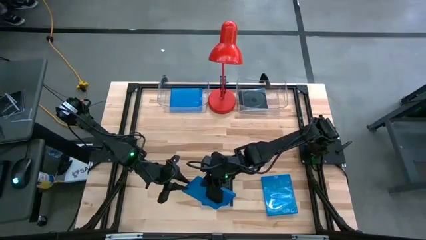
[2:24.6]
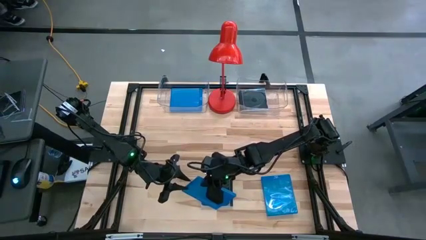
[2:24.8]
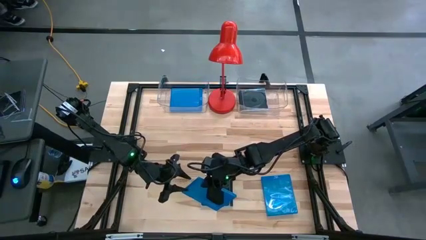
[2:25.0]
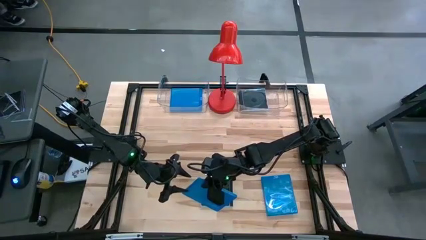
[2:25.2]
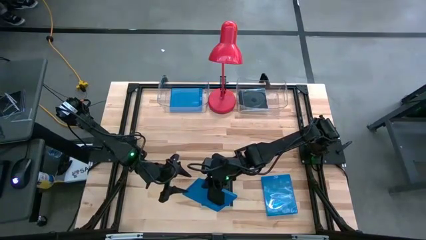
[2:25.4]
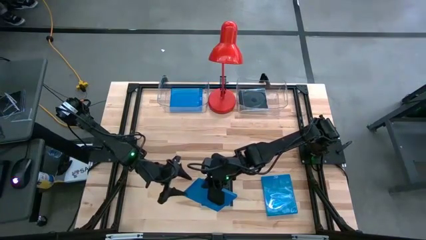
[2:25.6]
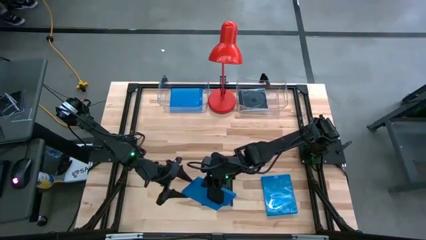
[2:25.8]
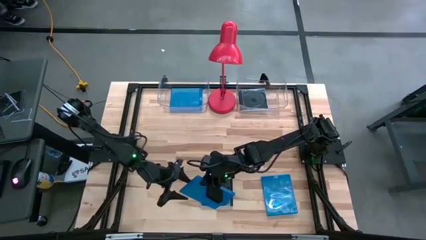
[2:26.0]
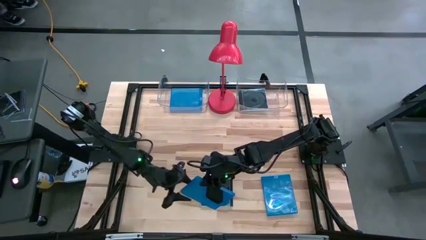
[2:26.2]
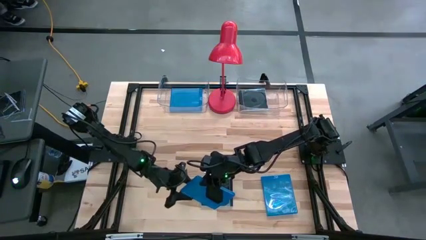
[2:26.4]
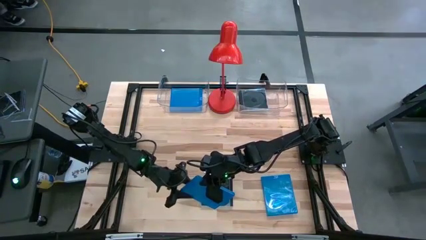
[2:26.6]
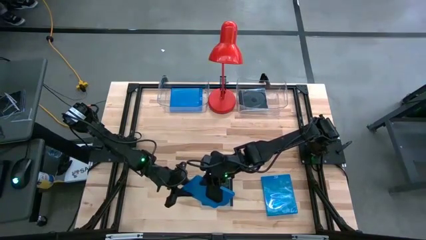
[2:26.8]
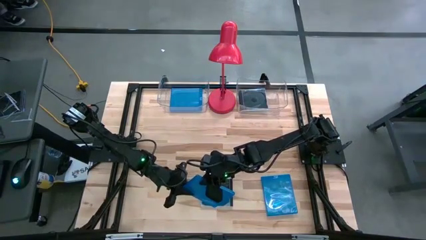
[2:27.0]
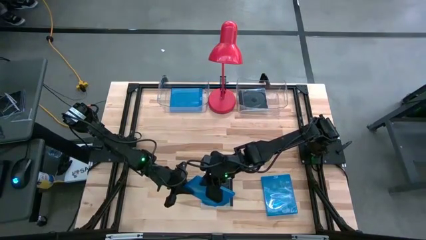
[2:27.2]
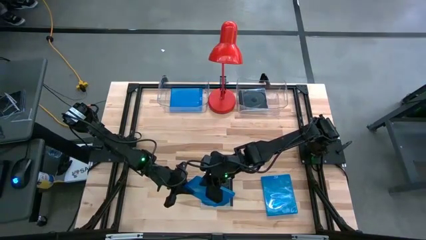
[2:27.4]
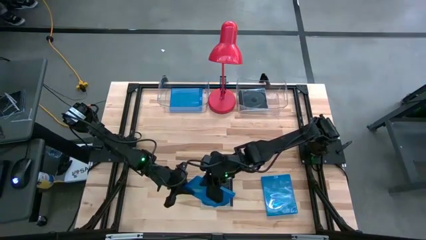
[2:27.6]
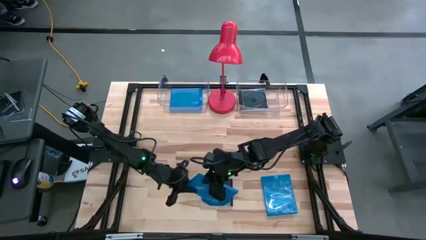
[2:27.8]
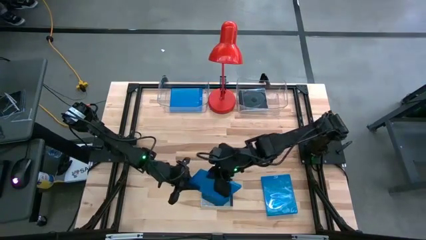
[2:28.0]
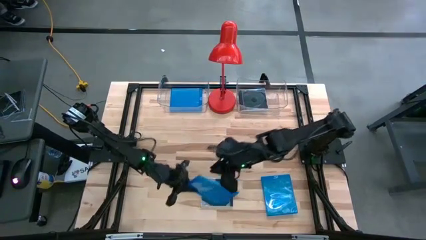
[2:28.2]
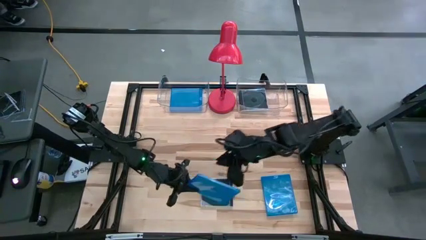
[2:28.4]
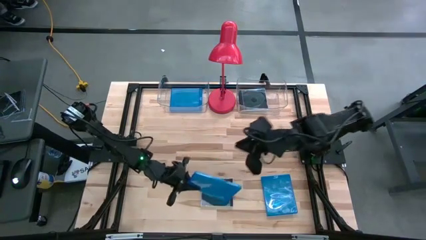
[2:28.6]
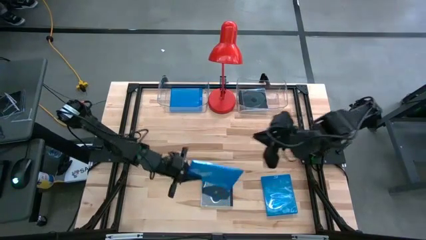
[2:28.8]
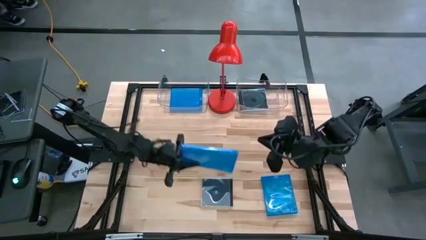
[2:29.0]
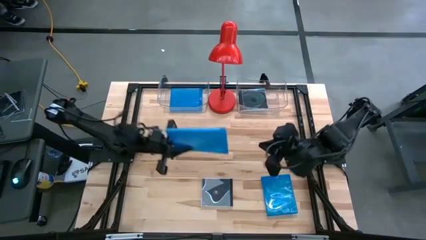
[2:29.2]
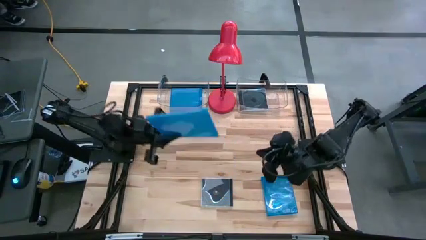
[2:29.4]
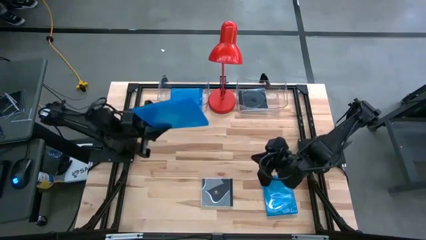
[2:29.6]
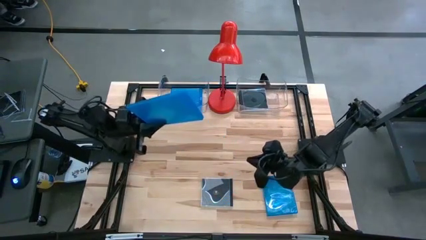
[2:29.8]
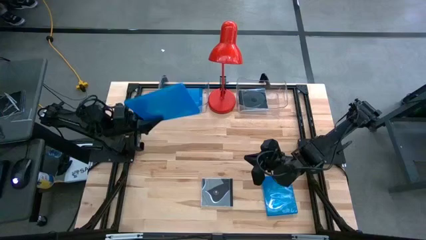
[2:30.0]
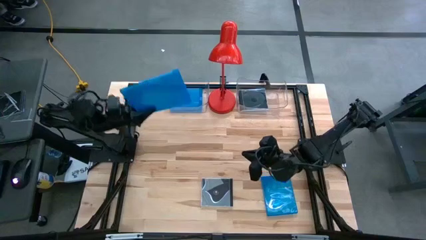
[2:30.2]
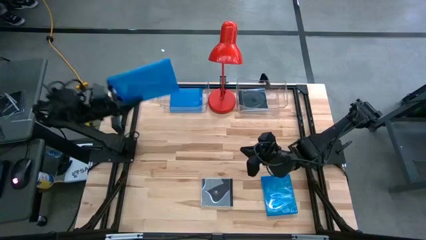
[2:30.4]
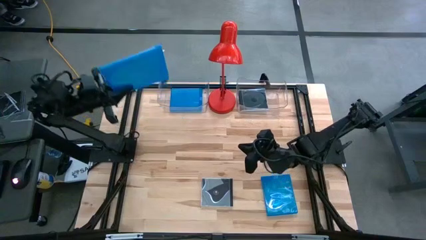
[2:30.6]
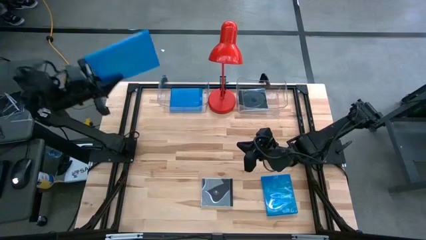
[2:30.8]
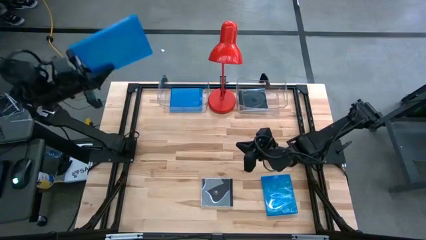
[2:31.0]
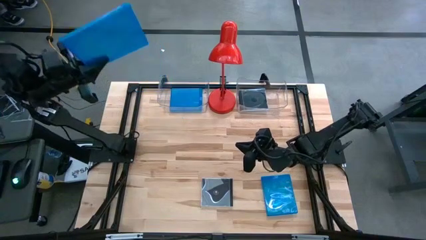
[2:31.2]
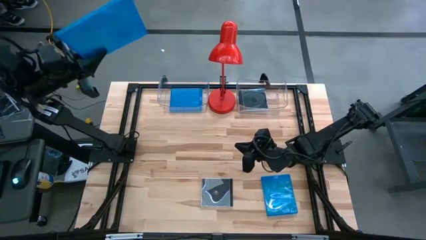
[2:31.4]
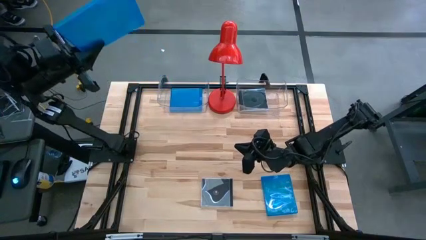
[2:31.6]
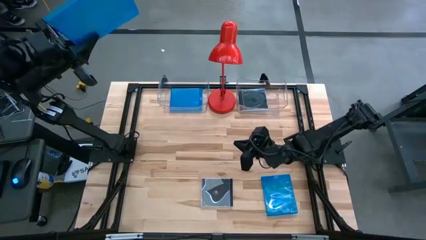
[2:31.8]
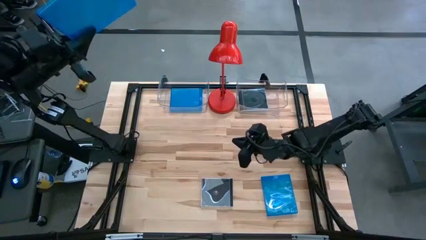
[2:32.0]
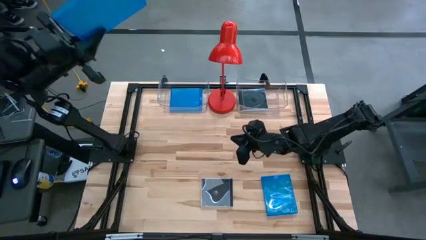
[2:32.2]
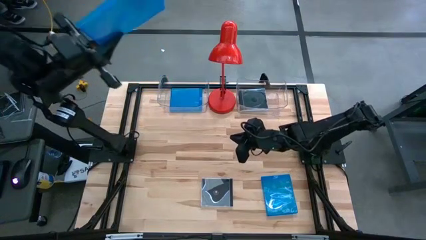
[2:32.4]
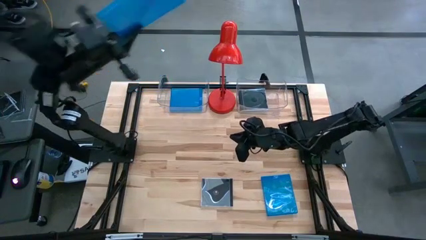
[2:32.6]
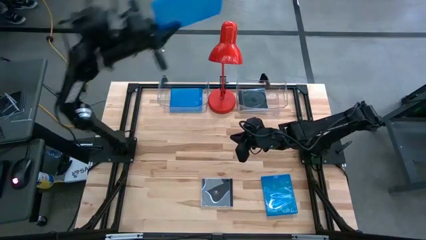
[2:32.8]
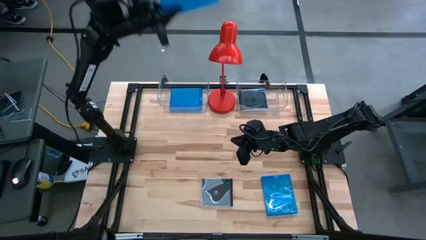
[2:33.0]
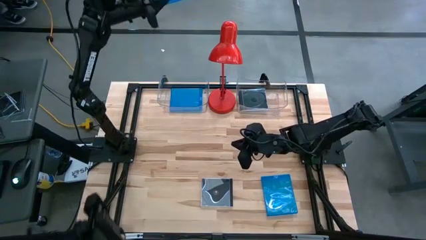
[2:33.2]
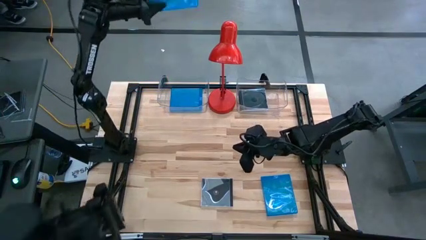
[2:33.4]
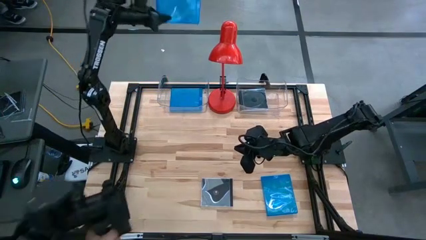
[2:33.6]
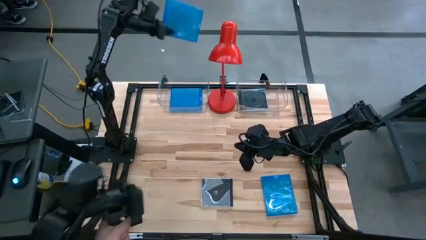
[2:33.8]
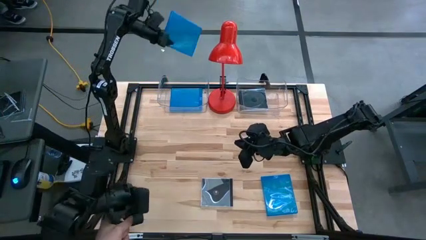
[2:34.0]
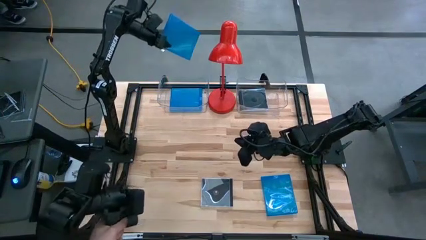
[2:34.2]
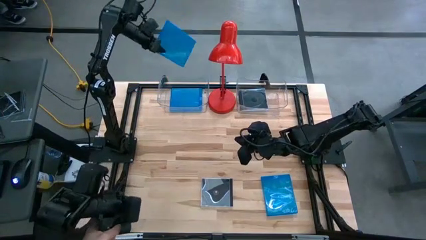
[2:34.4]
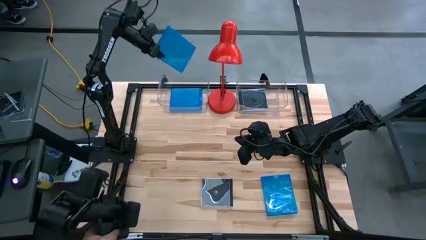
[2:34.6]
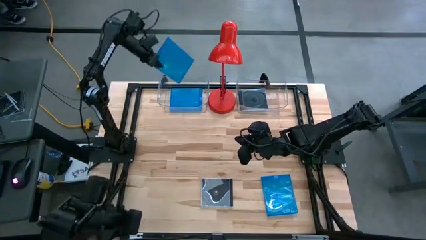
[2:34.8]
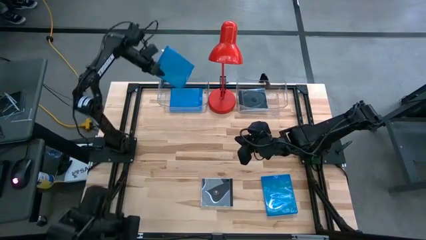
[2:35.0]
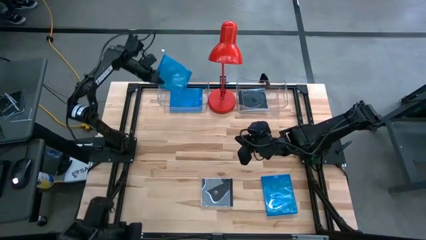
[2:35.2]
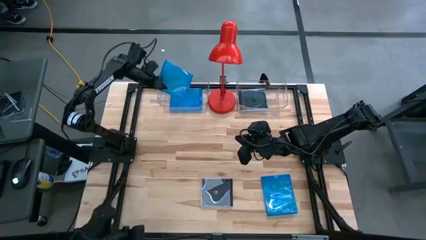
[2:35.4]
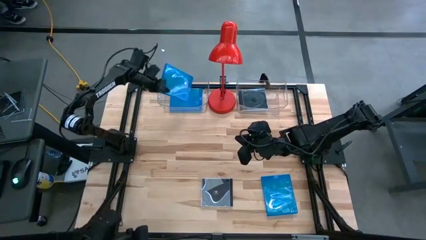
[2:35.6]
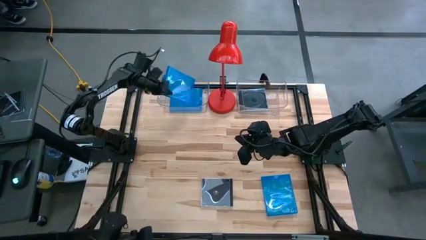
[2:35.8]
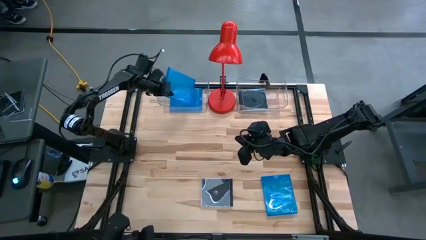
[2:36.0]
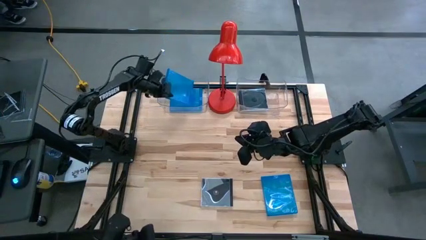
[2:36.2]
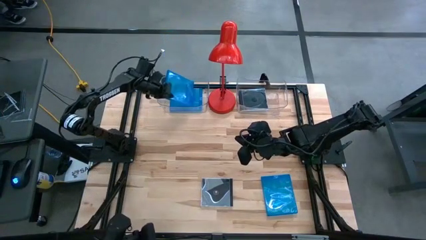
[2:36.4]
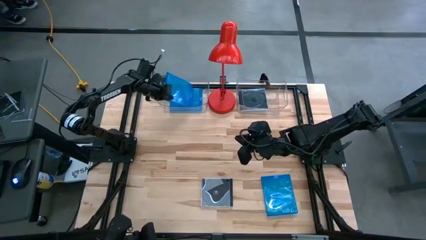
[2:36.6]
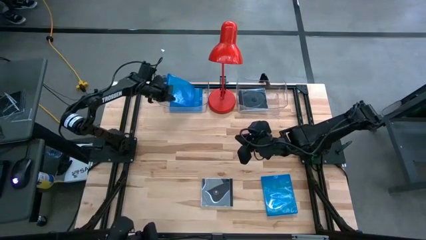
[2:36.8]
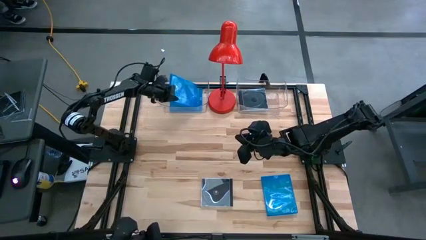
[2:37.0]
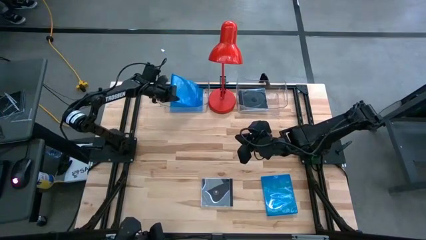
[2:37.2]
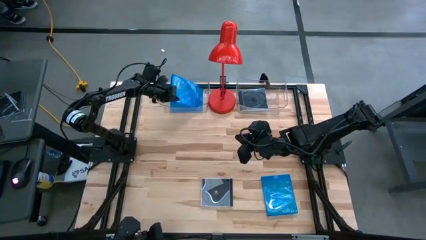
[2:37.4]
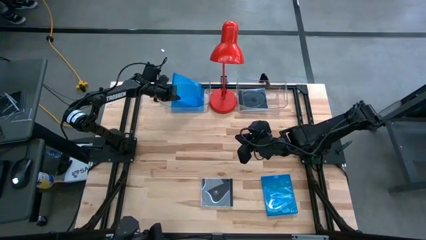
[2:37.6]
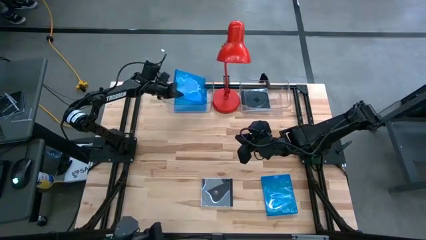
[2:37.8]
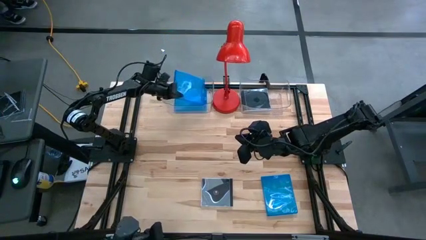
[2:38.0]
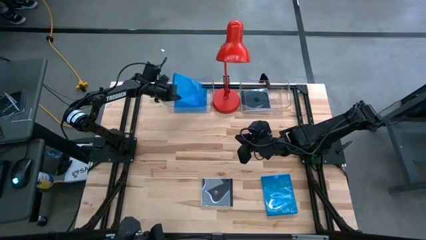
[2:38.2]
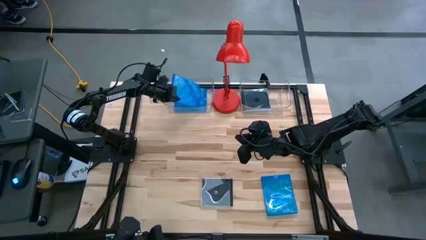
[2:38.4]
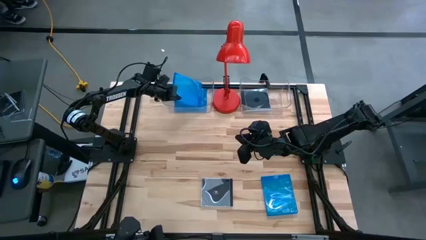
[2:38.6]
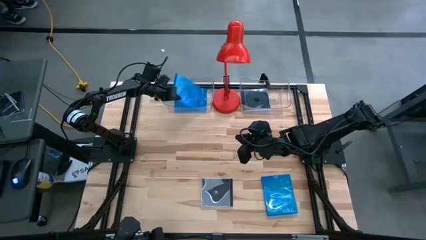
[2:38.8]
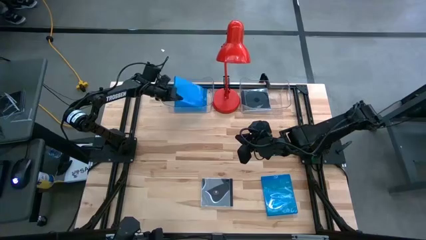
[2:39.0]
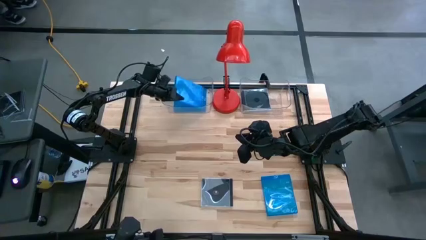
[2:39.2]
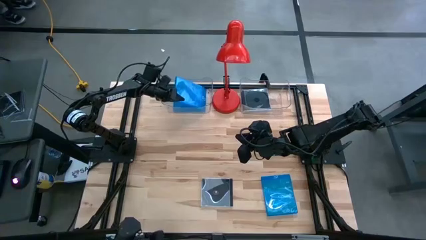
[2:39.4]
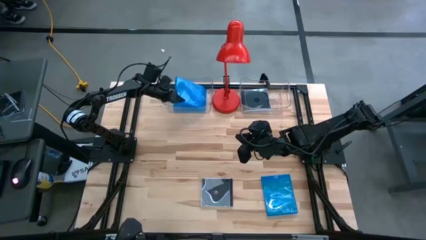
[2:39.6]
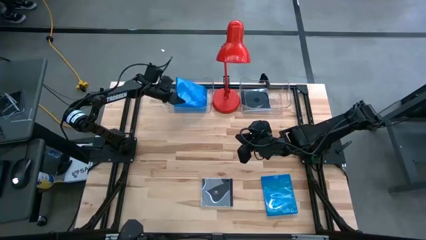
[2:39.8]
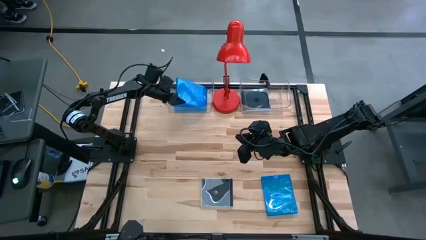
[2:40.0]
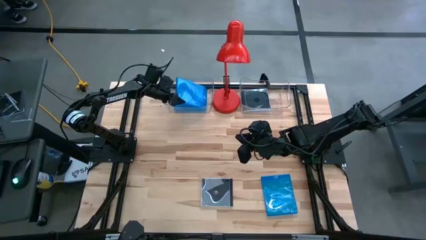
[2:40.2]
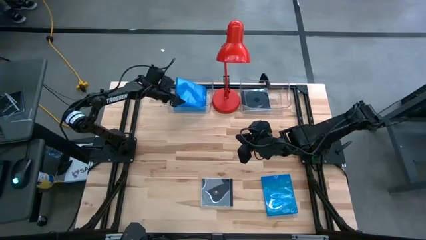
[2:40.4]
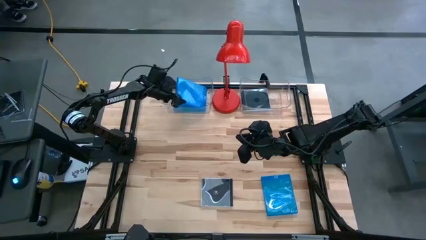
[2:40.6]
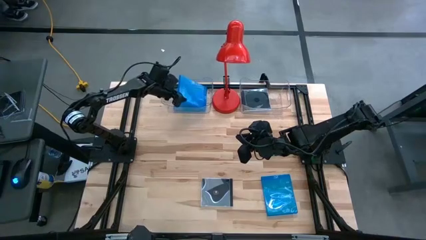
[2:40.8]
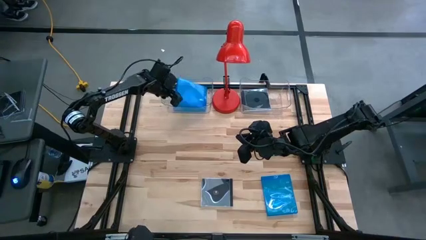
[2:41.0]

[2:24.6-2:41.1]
Task: Pick & place jewel cases by type
Put the left blue cd case into the left transparent bin

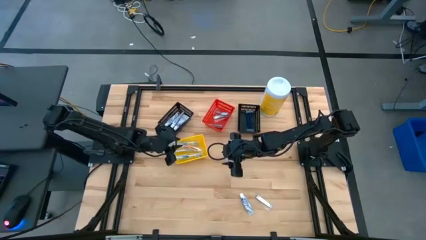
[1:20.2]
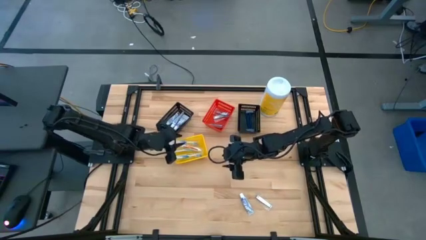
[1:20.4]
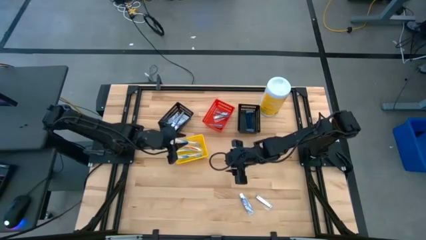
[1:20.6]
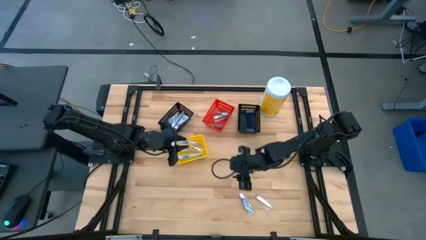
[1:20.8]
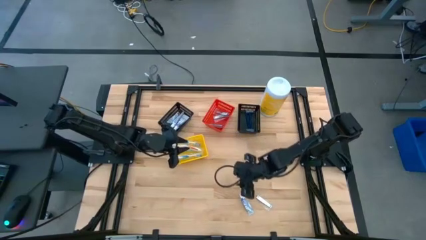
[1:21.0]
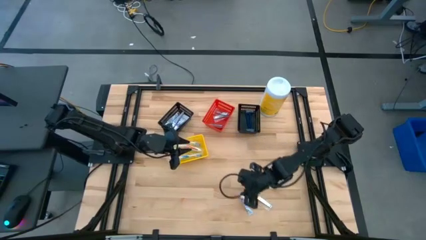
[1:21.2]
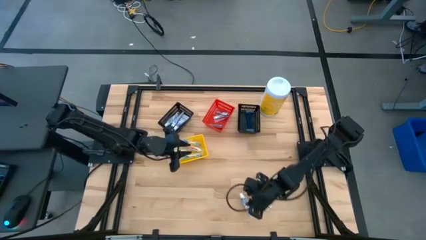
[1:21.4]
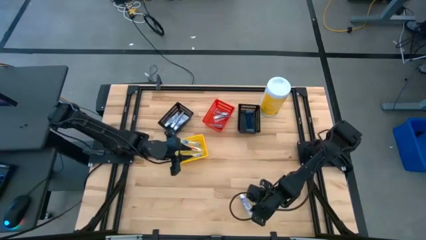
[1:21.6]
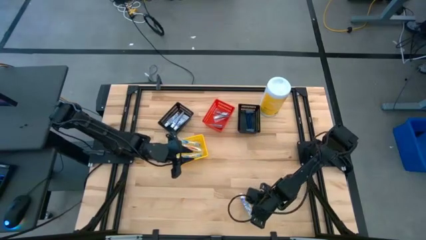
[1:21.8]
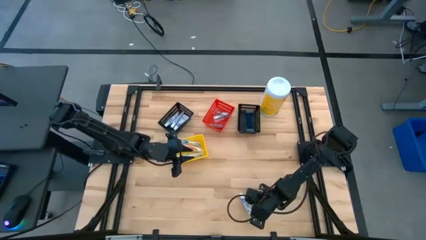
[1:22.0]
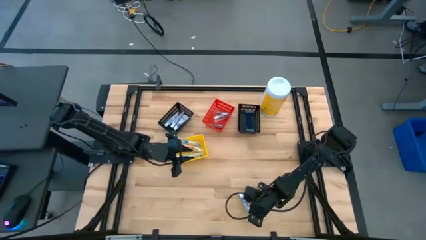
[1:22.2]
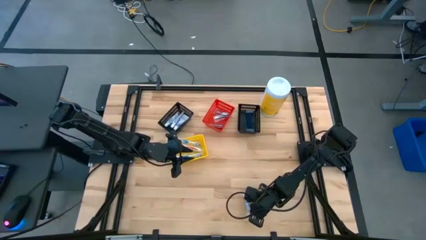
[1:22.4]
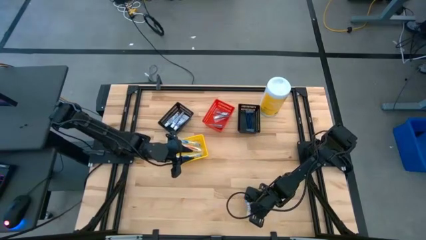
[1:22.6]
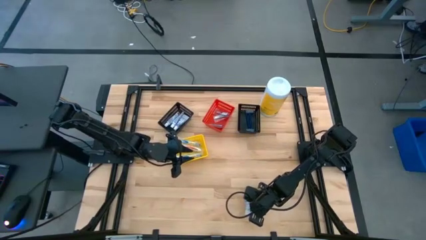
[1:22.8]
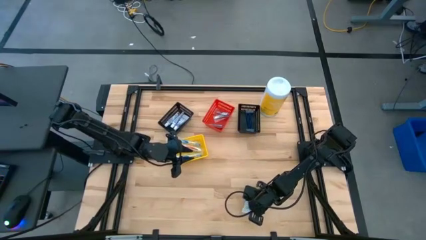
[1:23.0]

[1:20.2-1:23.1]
Task: Pick & Place Travel size toiletries
Put the white toothpaste into the left black bin
